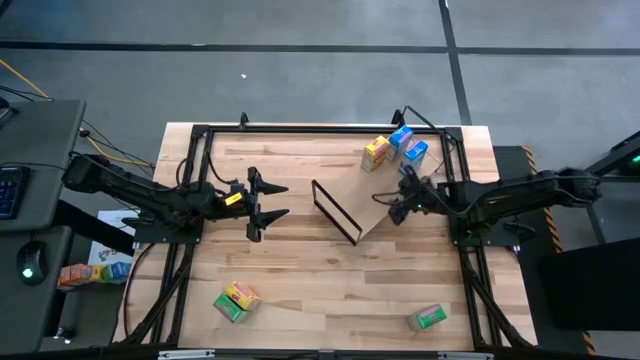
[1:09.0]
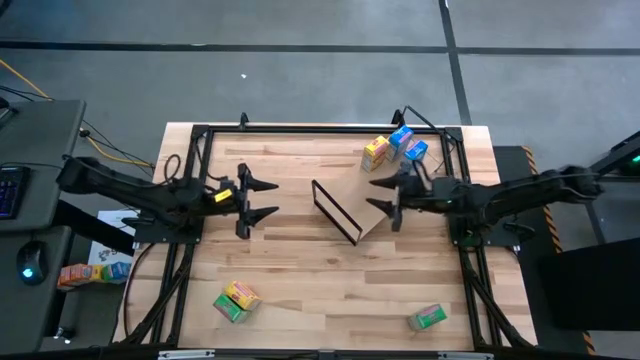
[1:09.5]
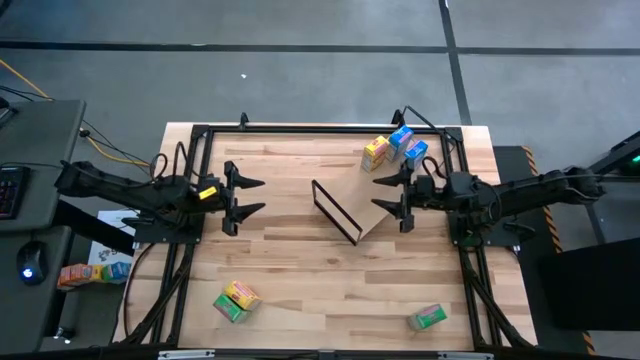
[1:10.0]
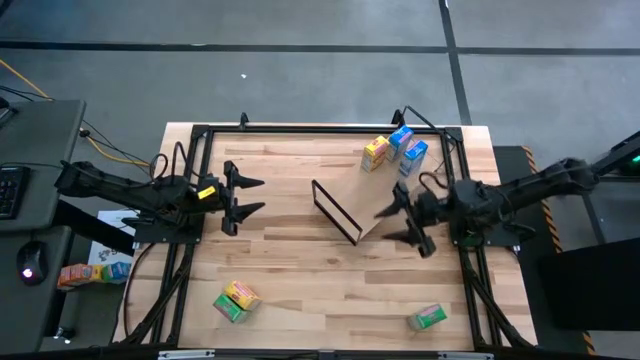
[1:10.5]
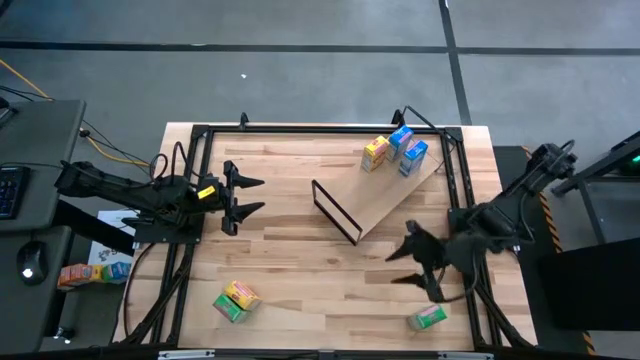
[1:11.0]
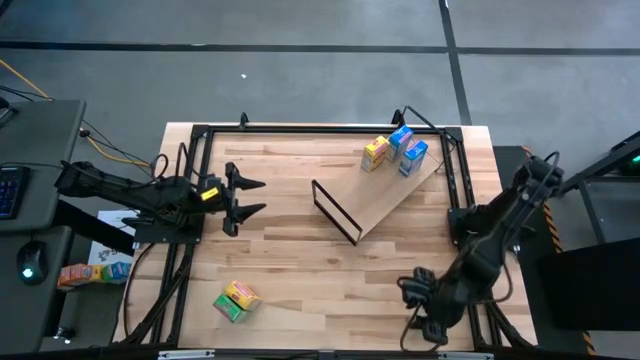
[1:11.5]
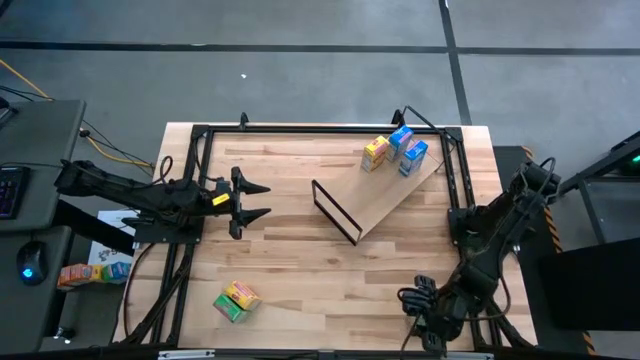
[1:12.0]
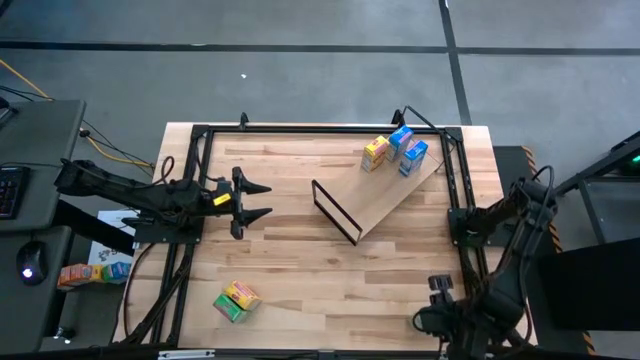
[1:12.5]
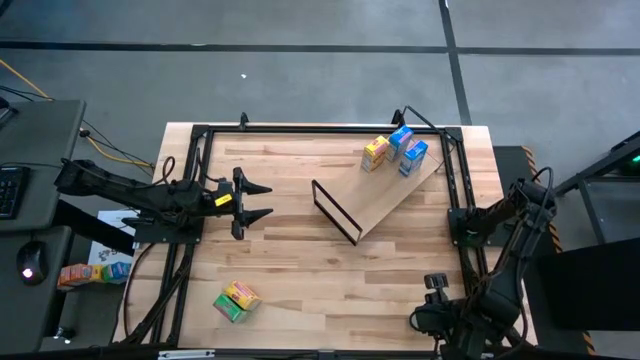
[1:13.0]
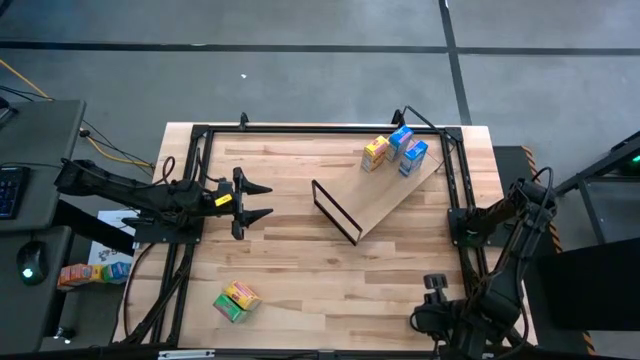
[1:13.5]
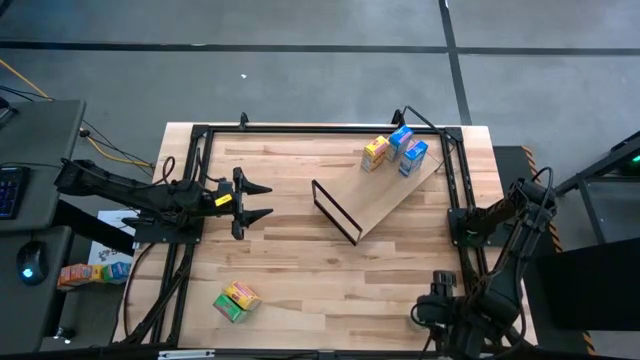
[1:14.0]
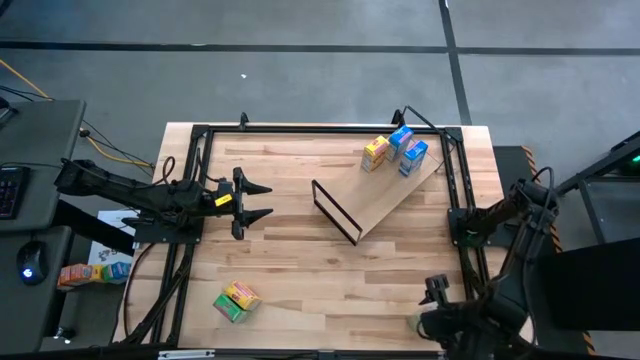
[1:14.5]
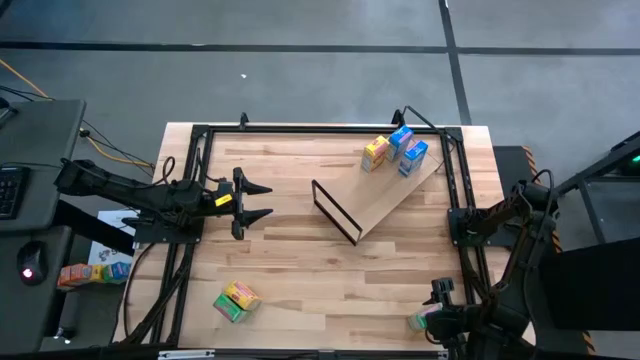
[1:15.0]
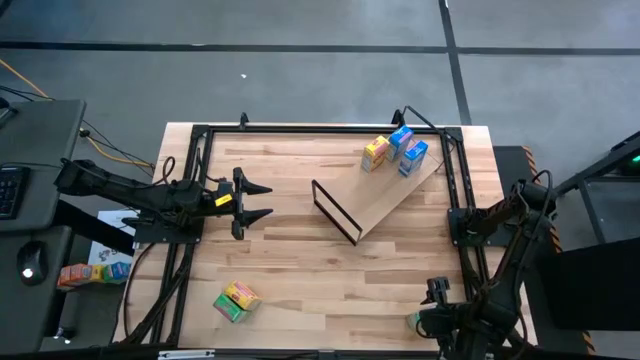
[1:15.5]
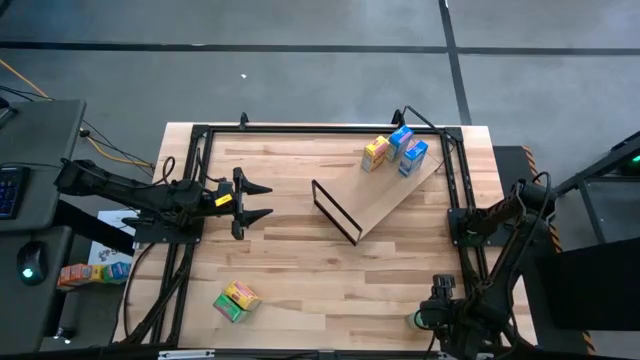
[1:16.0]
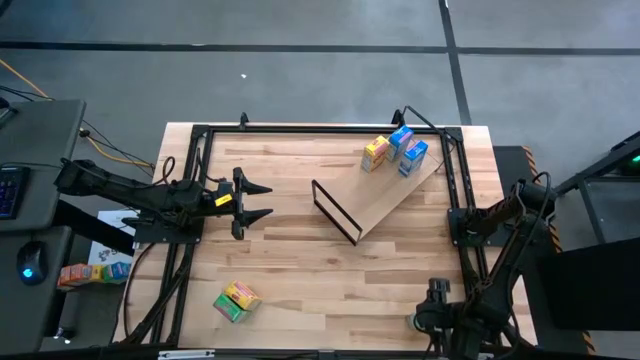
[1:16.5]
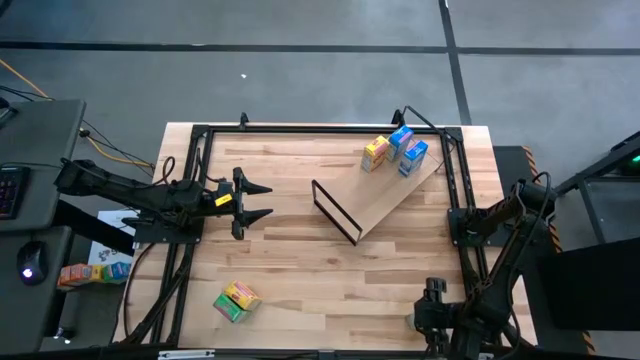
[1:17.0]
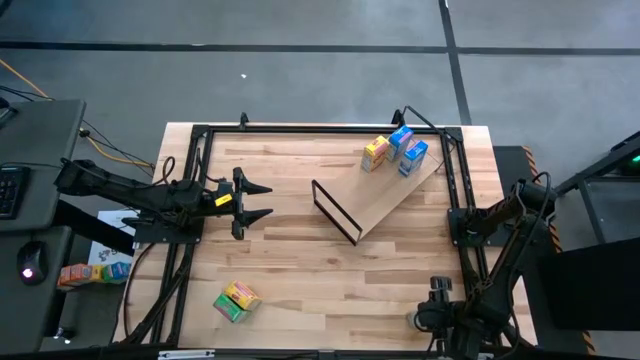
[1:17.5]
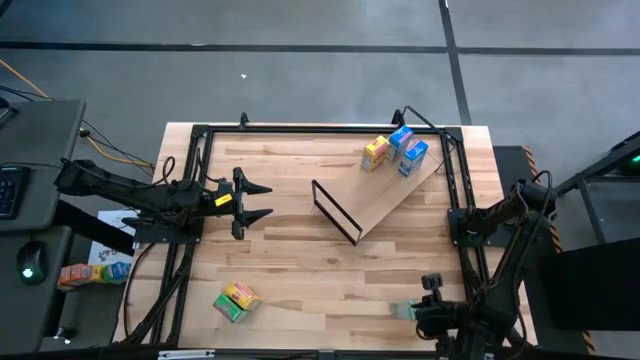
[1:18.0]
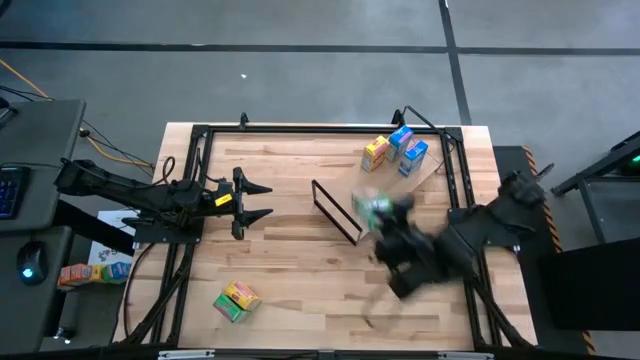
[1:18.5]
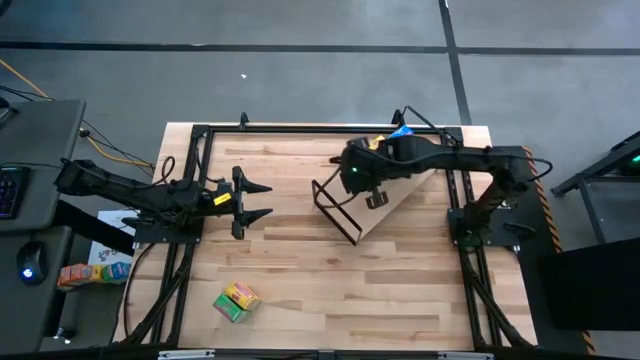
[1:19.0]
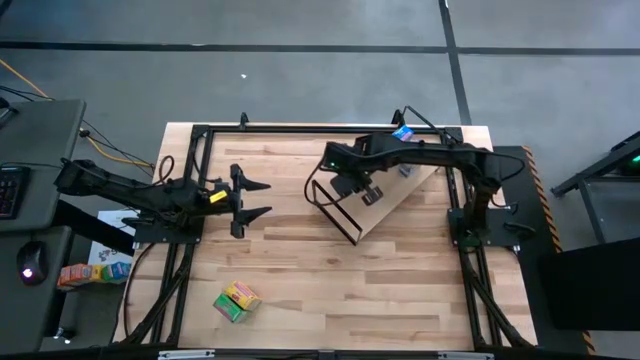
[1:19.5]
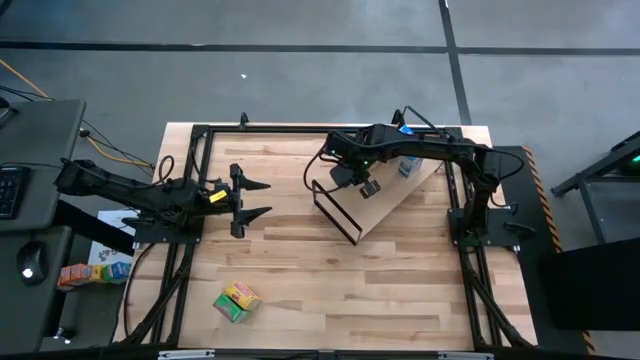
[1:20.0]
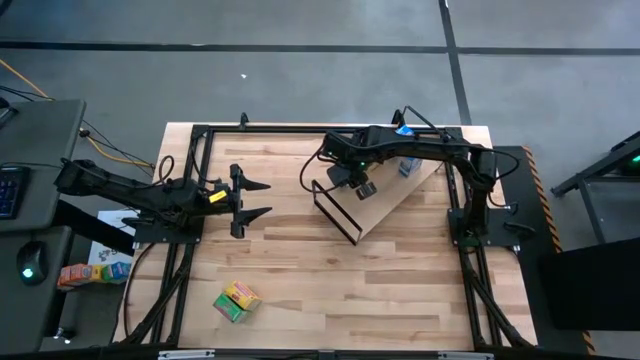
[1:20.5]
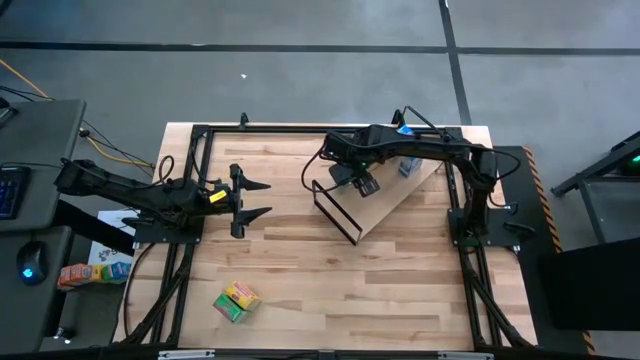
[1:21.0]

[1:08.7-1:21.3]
Task: Stack cereal on shelf
Put the right green cereal box on the shelf

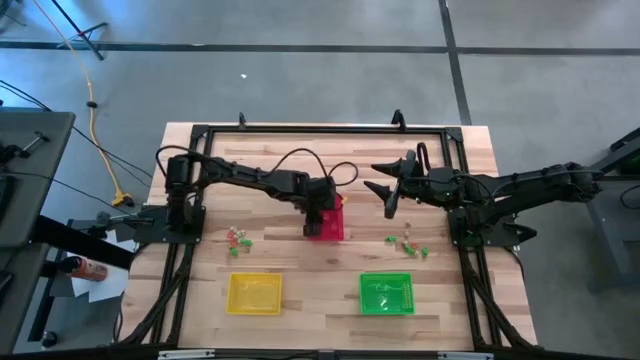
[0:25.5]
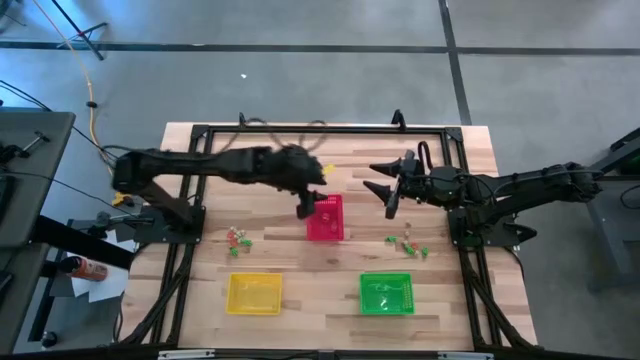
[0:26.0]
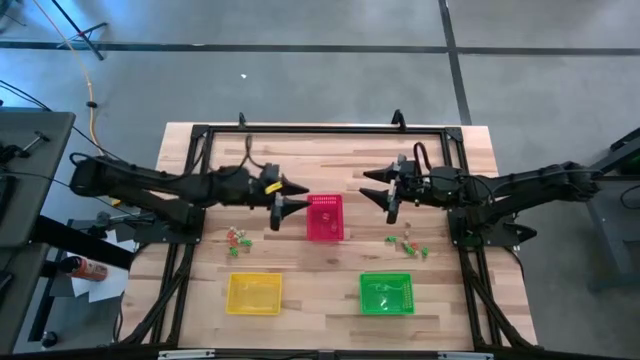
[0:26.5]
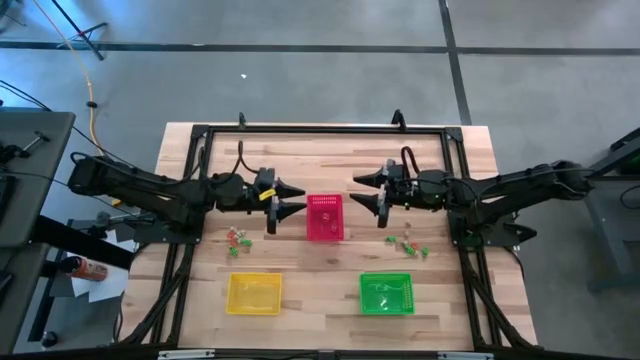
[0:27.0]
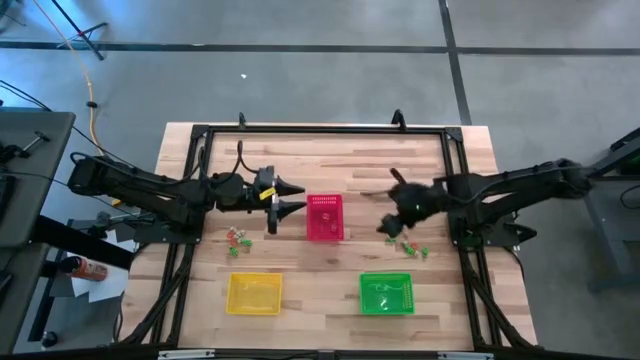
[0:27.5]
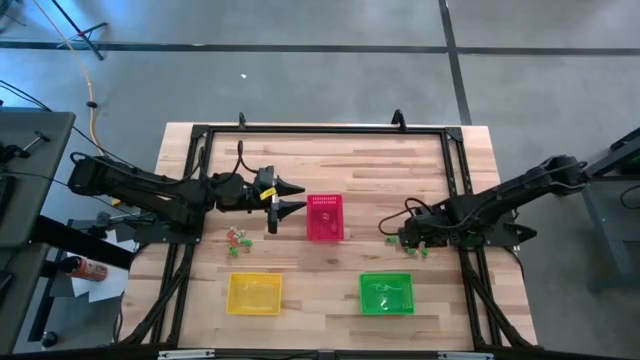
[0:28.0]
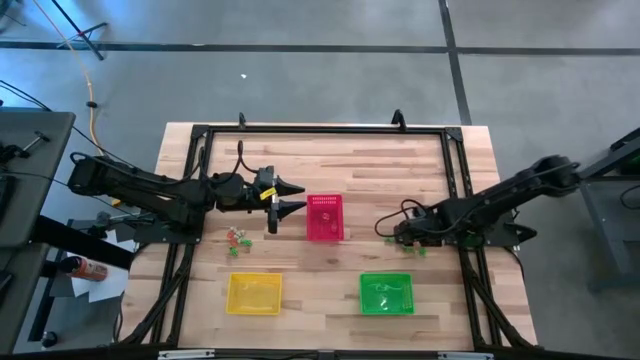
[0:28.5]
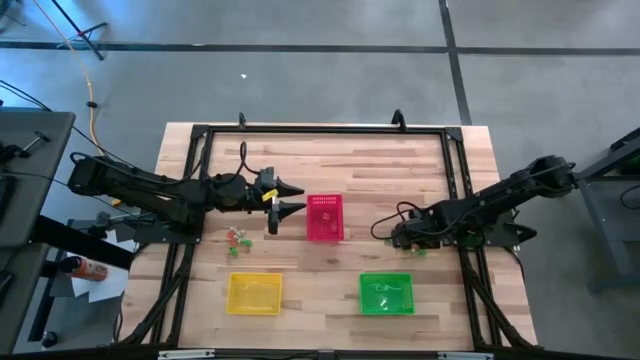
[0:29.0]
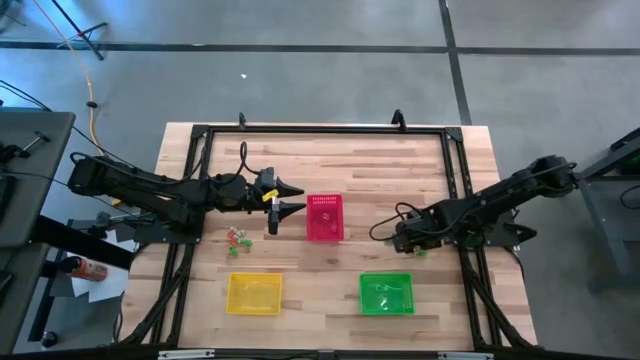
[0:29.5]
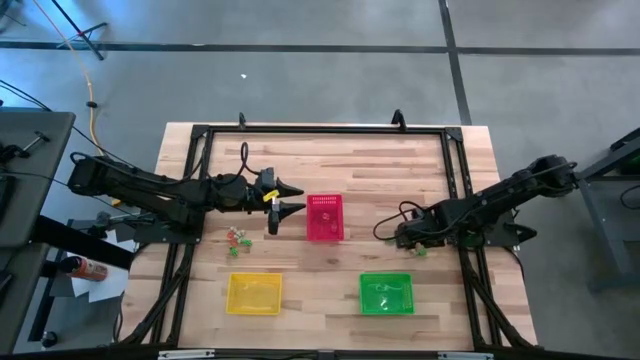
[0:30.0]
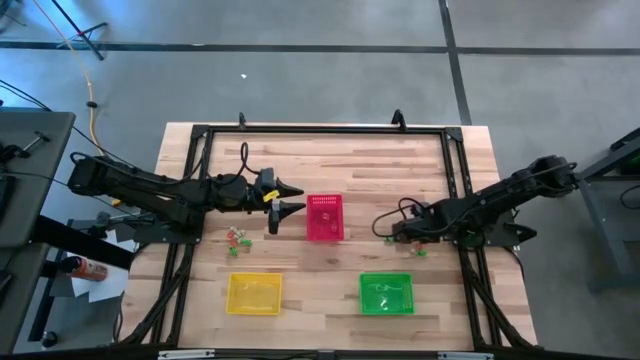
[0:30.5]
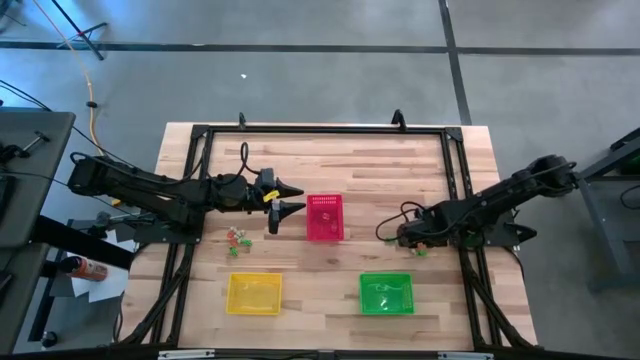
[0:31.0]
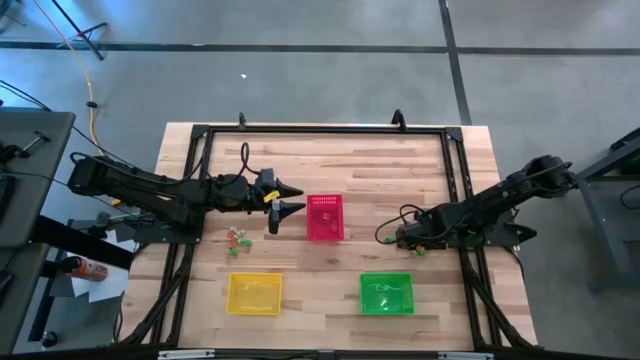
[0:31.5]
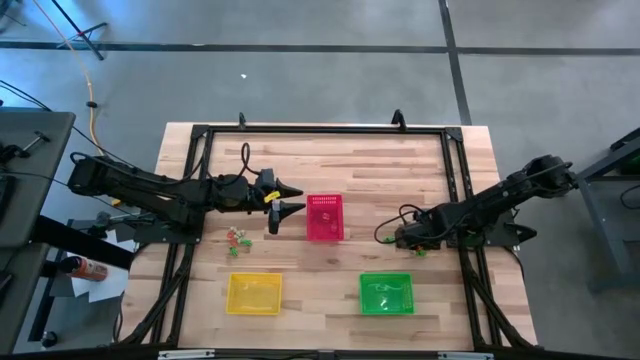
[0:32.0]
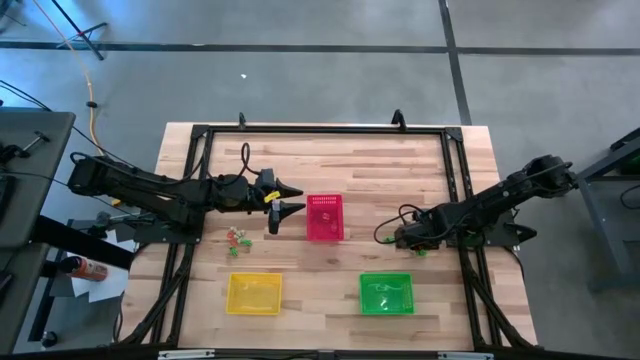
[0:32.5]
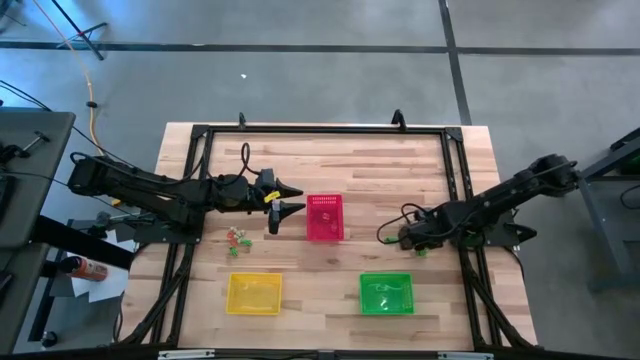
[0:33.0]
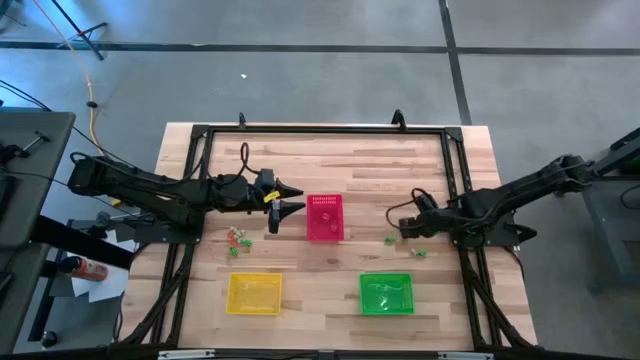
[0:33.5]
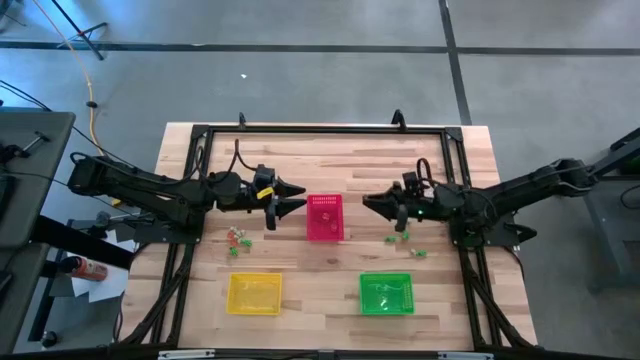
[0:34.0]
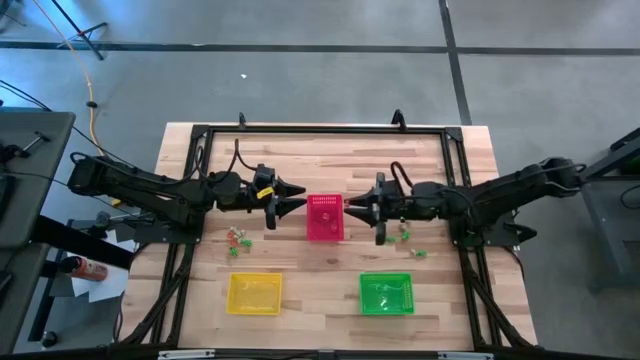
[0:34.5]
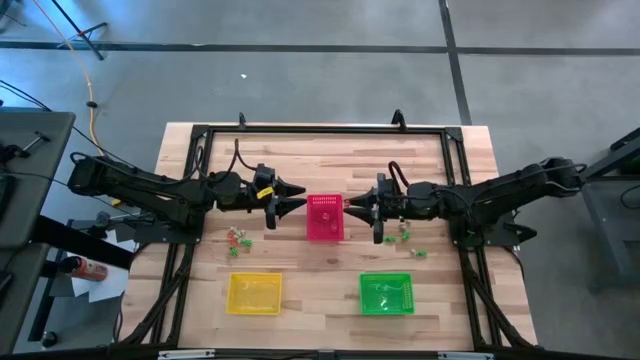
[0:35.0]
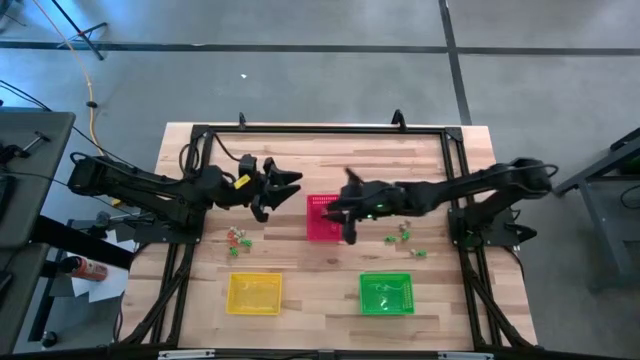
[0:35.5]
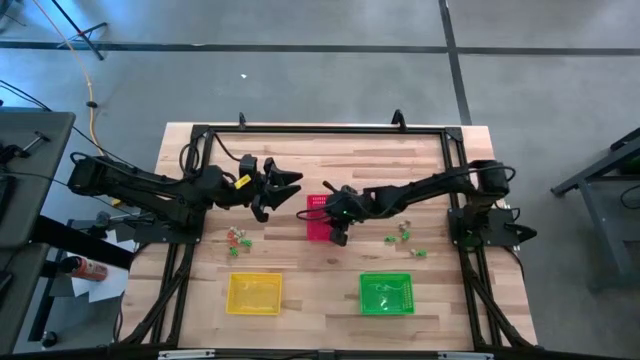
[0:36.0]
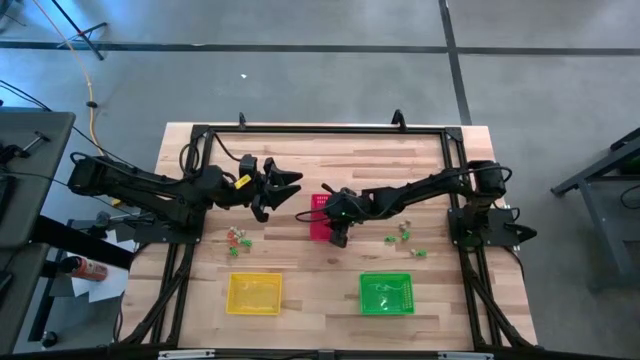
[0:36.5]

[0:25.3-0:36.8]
Task: Sort Halloween decoration
Put the right orange pumpkin toy into the red bin
